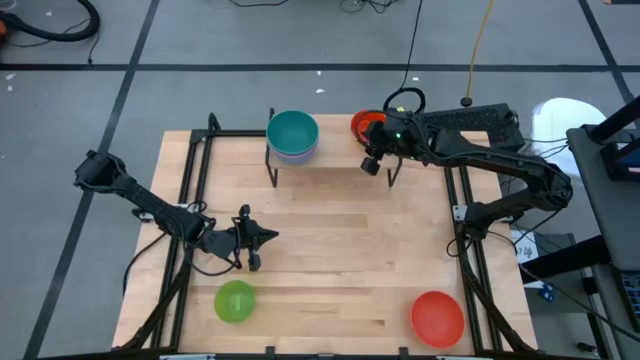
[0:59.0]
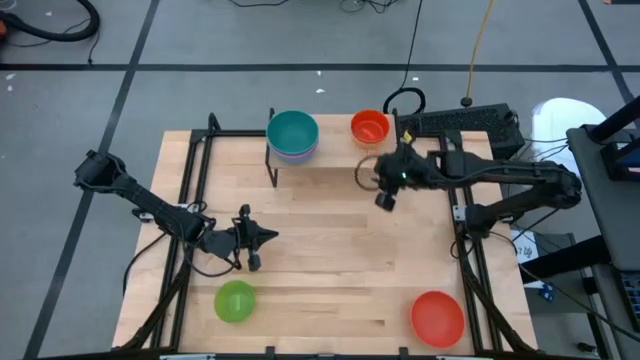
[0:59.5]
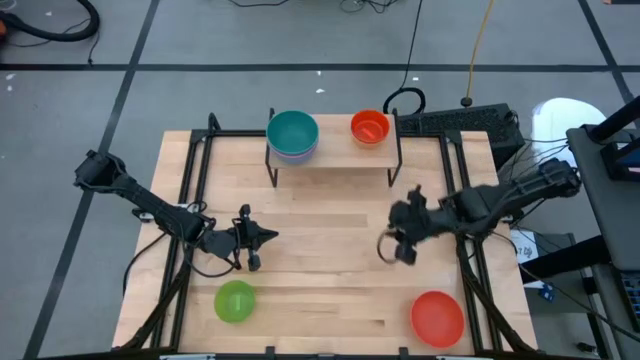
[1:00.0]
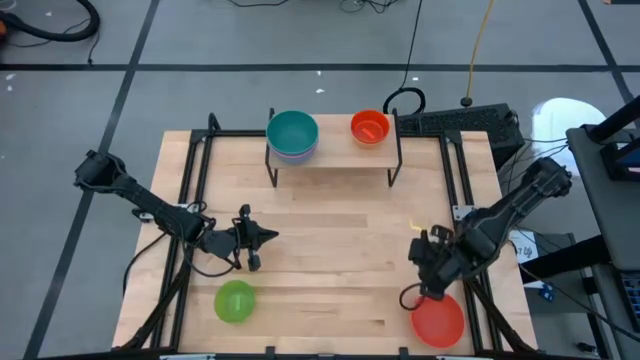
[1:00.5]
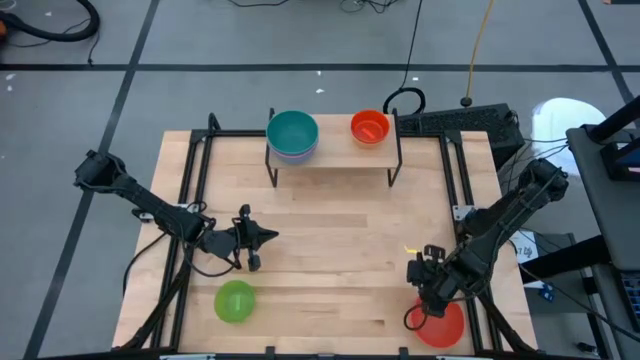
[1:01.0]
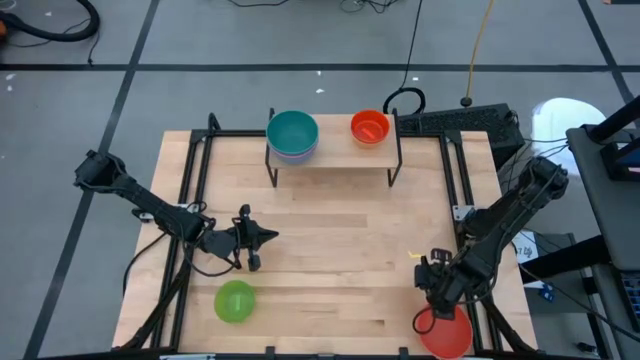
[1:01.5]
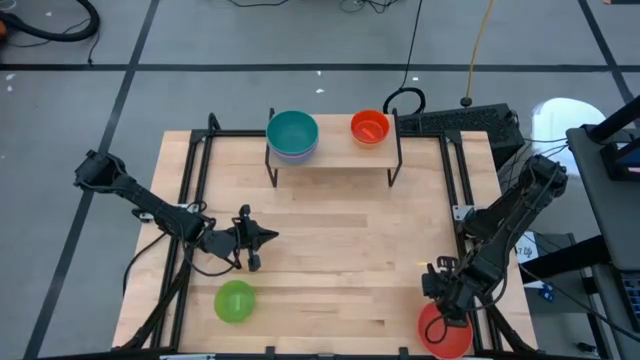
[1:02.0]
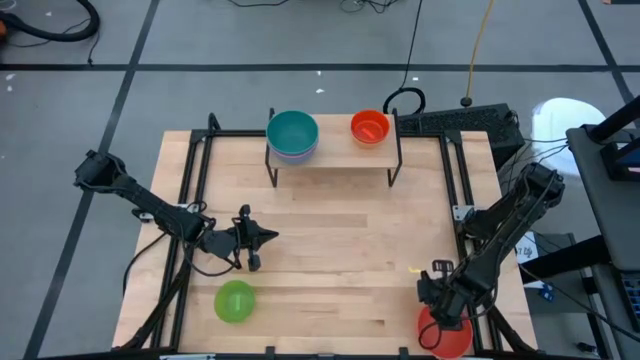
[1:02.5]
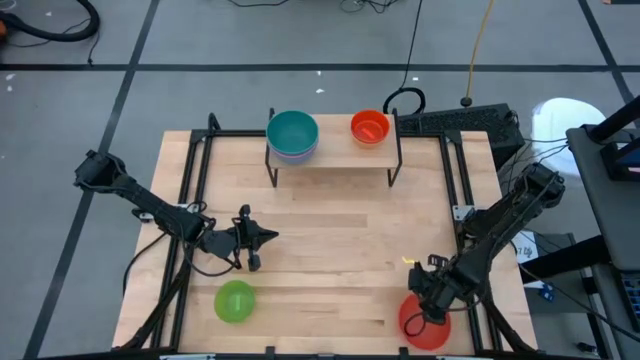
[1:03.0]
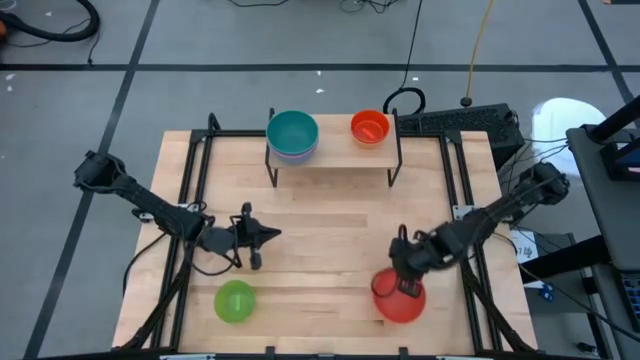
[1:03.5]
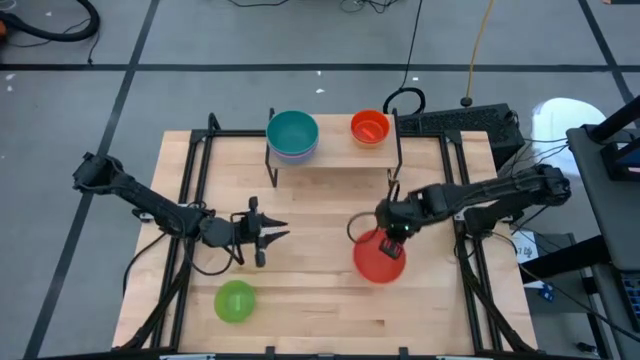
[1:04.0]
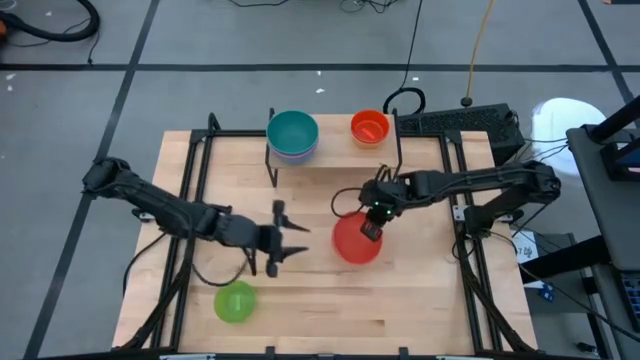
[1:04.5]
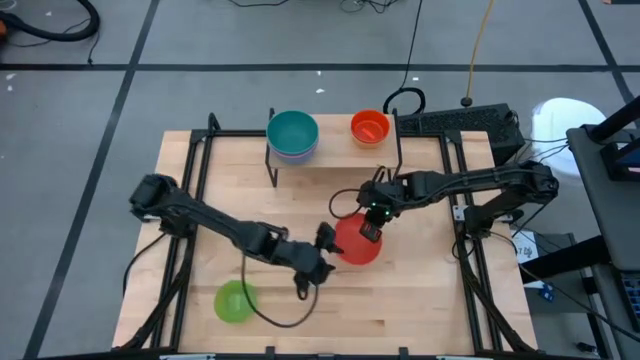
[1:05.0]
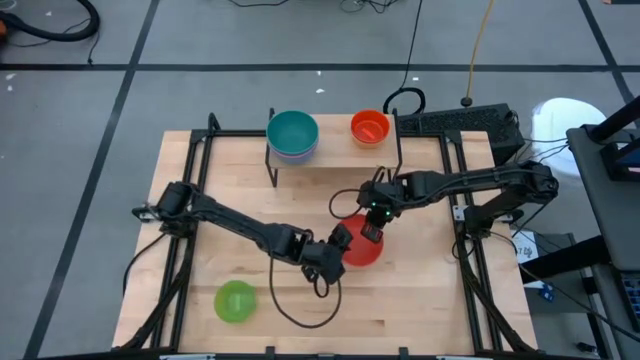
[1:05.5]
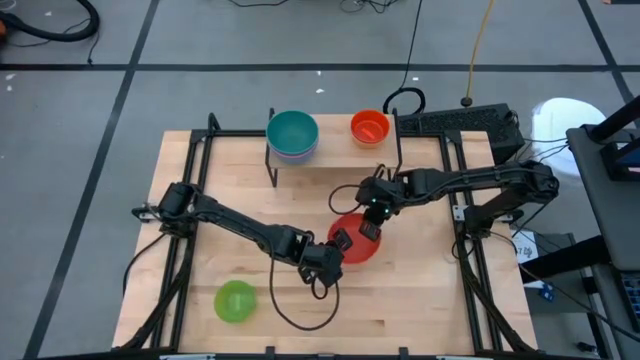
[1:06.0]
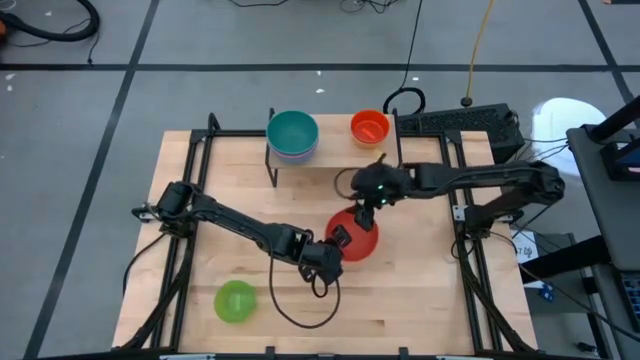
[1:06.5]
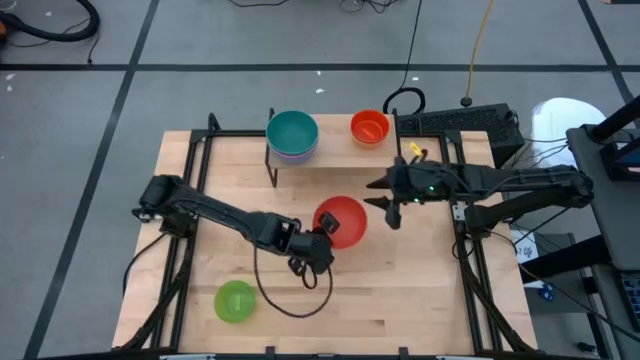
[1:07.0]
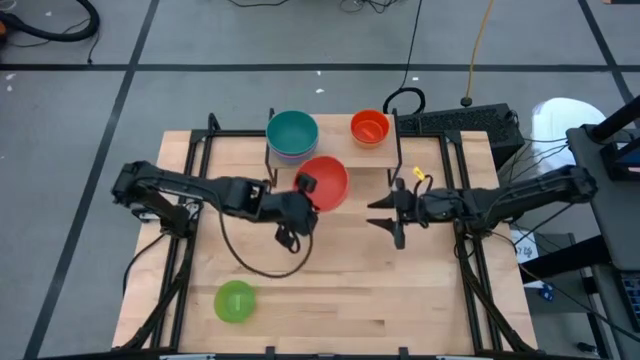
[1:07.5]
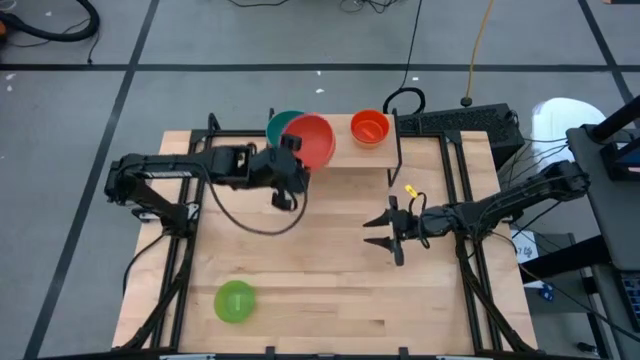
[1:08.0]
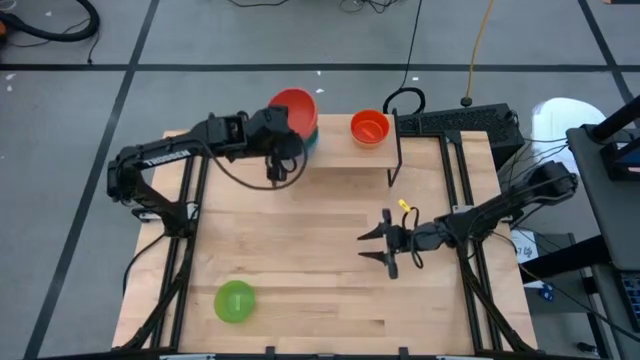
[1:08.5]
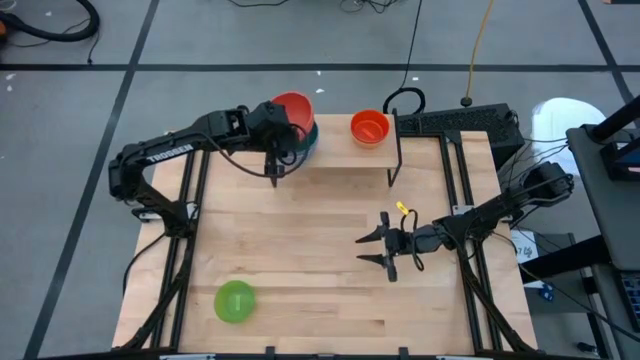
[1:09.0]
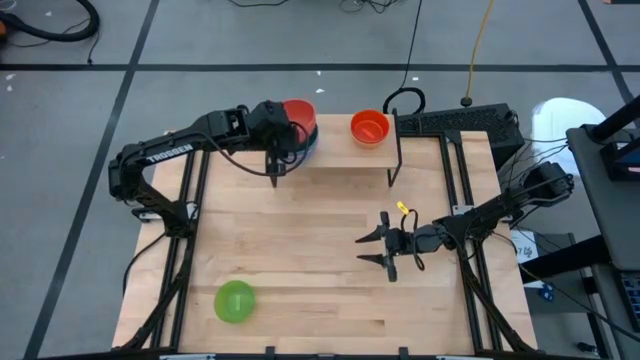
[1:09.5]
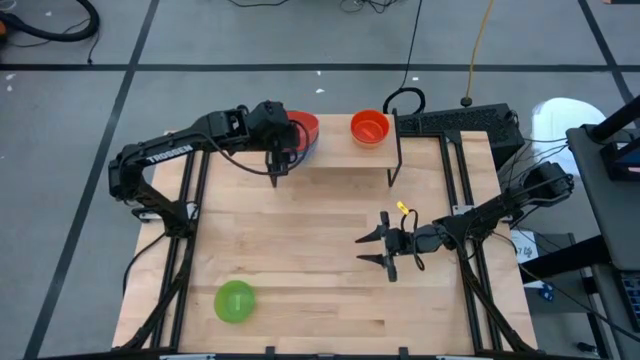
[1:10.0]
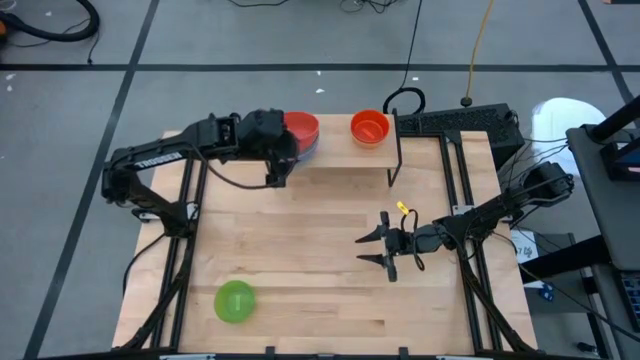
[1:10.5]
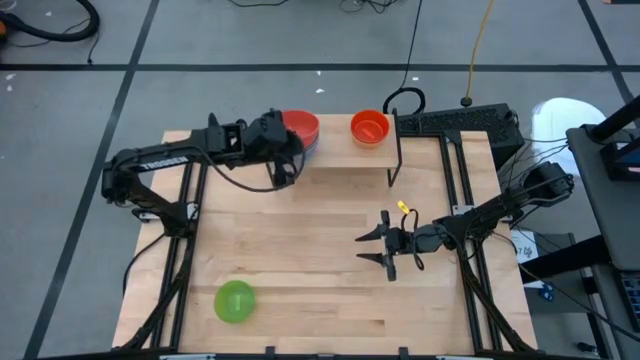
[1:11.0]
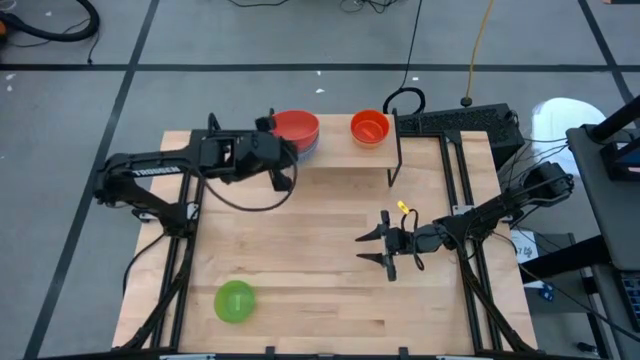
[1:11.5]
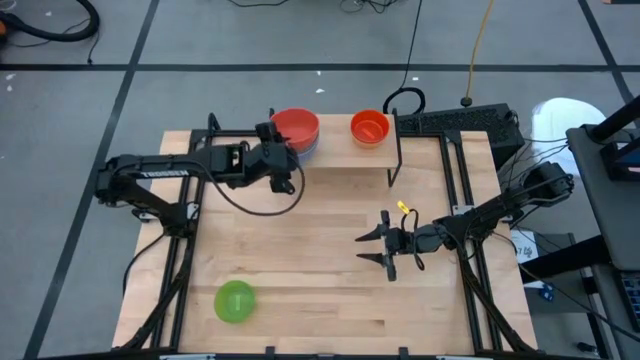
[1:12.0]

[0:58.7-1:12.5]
Task: Place and stack bowls onto a shelf
Stack the orange bowl on top of the green bowl on the shelf

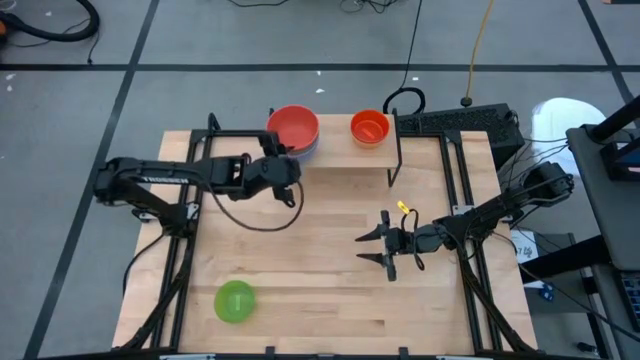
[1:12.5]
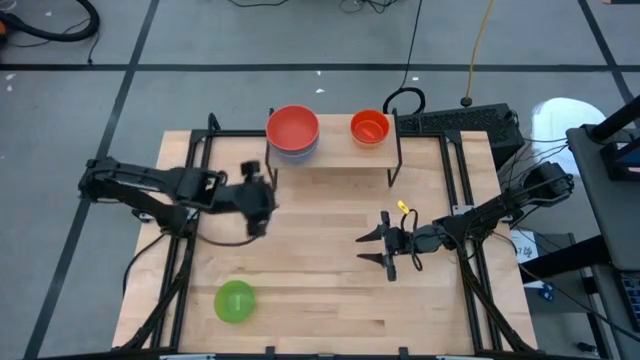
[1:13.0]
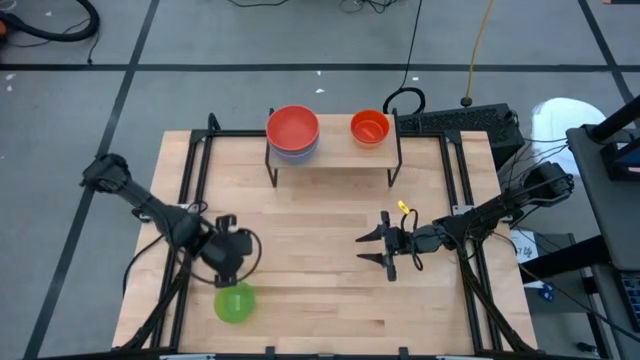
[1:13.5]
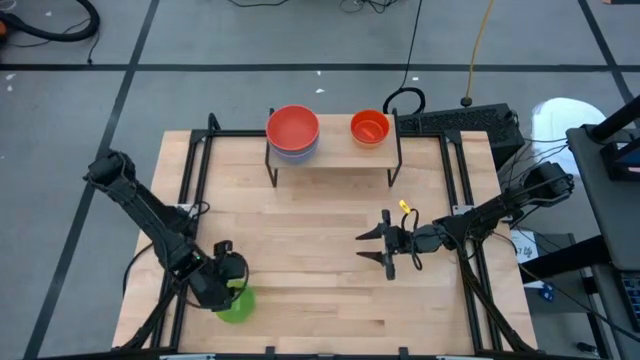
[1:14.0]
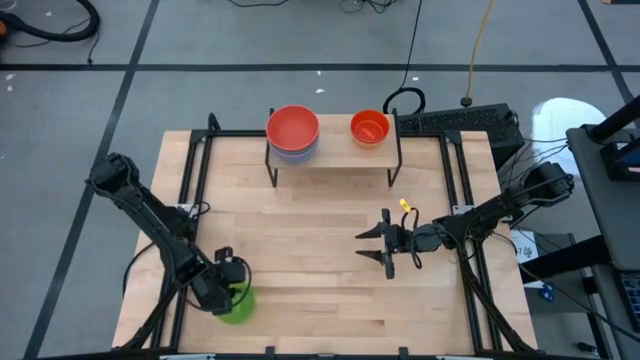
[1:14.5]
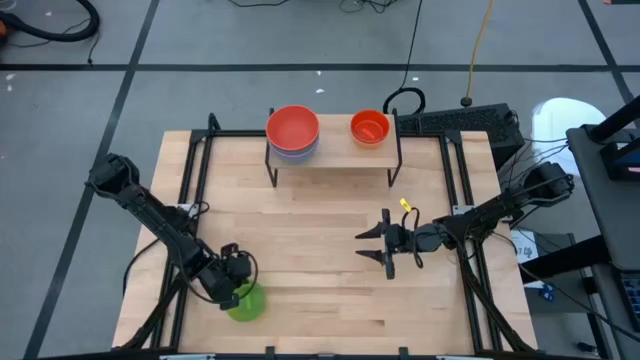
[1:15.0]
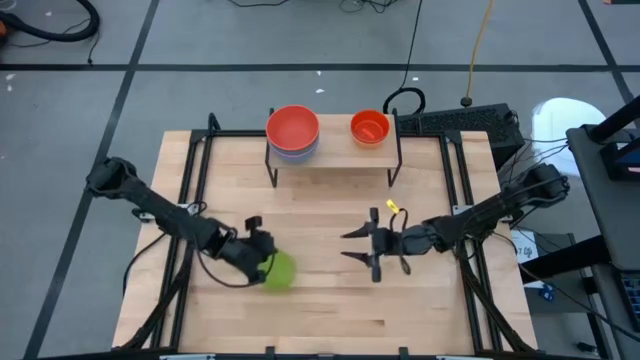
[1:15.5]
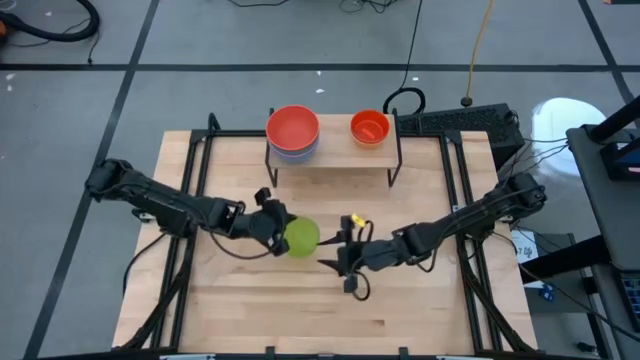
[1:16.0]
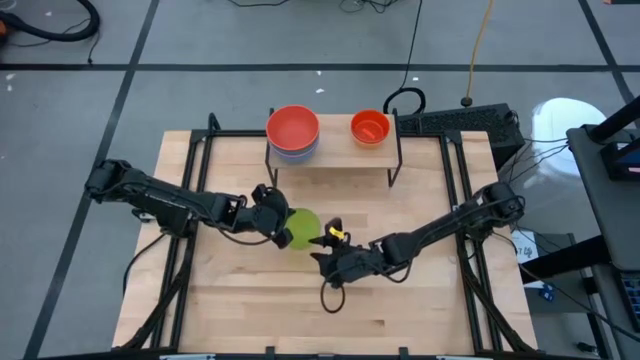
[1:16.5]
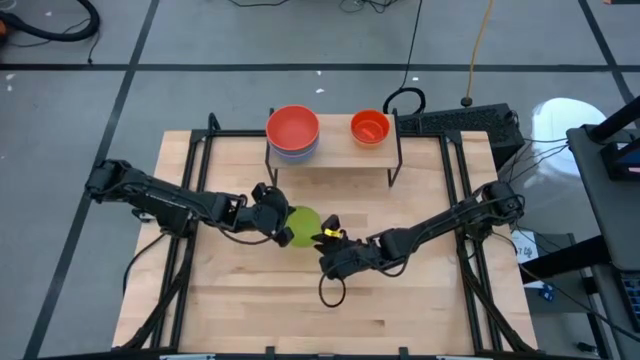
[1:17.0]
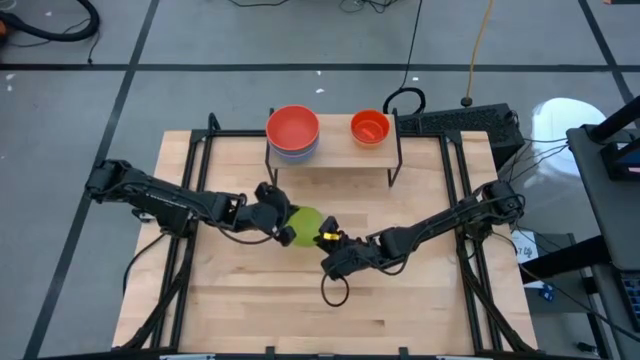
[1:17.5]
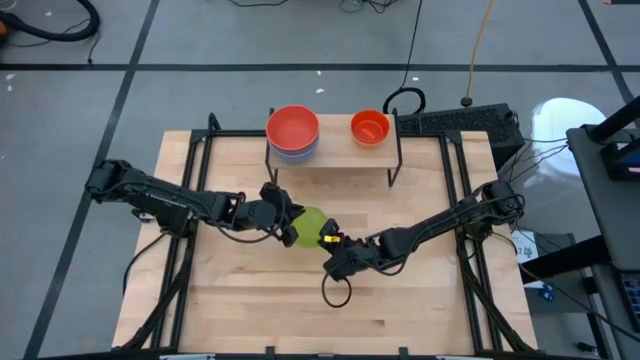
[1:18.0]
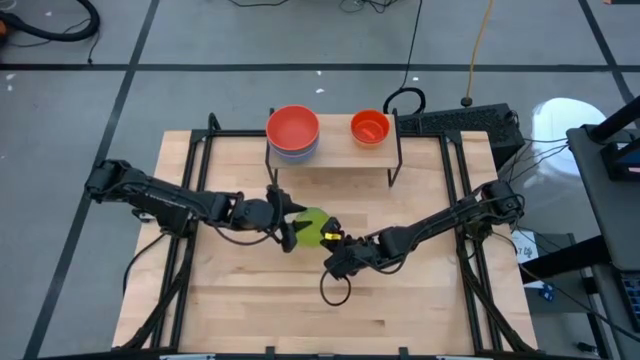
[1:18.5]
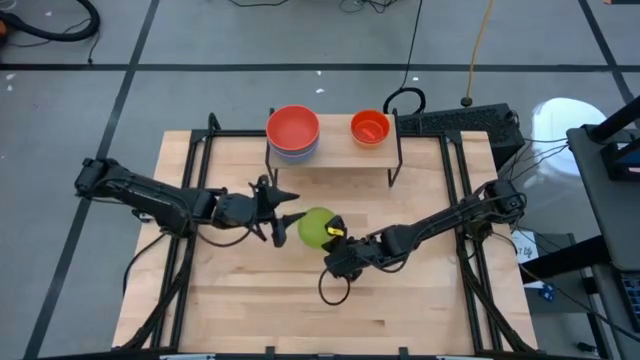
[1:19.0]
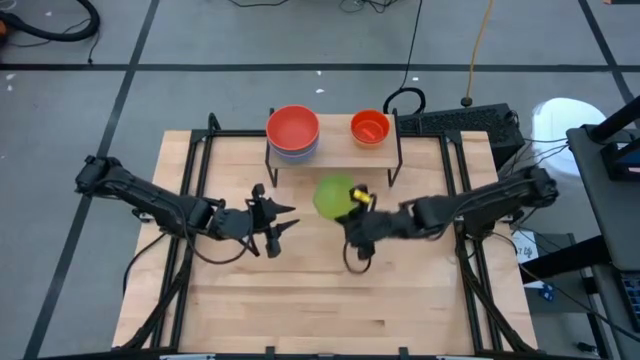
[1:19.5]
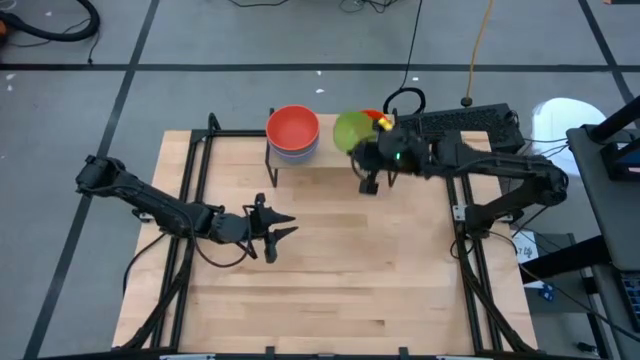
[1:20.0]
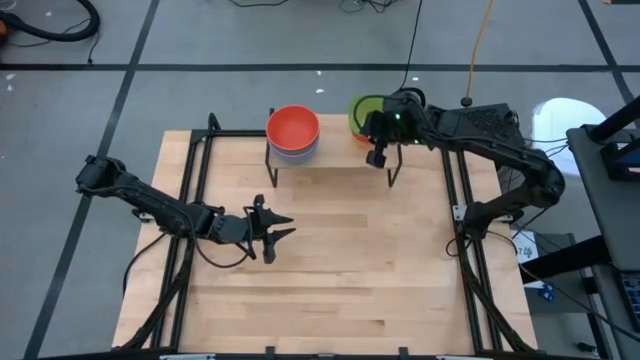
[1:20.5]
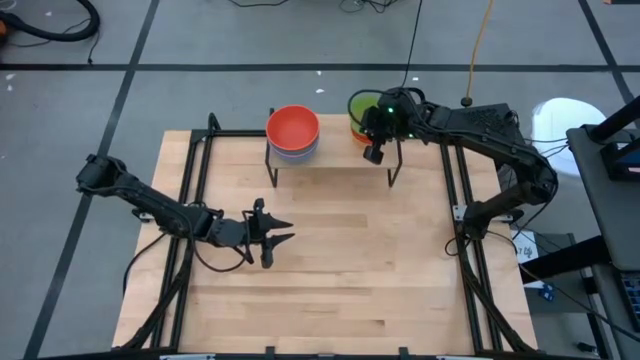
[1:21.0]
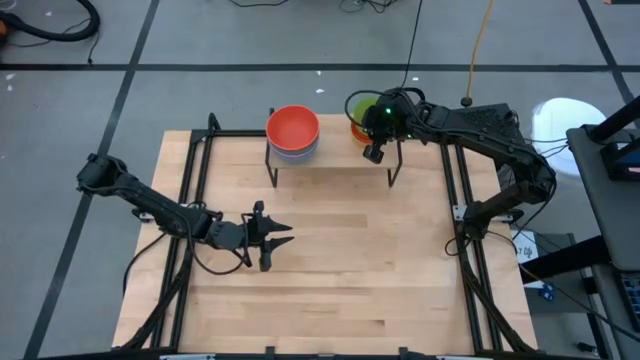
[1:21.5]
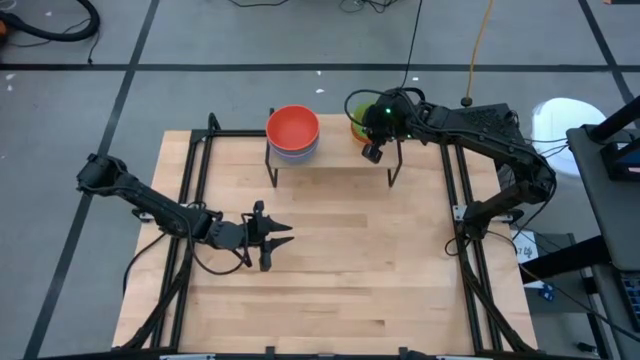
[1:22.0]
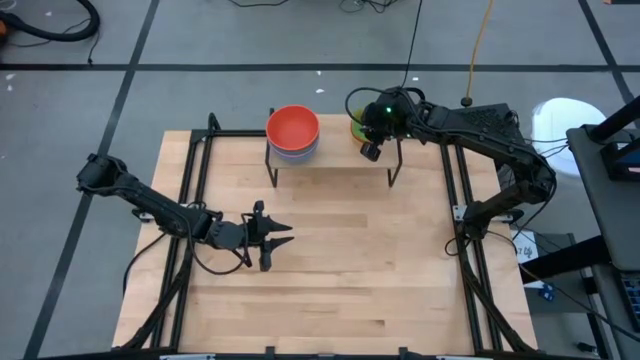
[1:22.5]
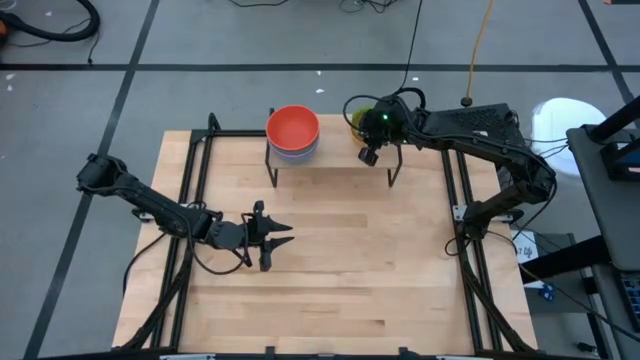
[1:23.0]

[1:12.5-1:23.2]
Stack the light green bowl on top of the right orange bowl on the shelf
